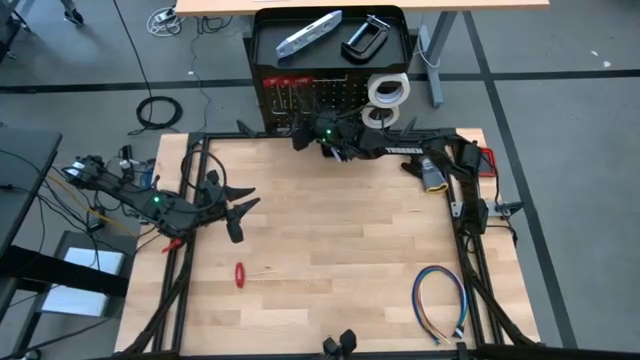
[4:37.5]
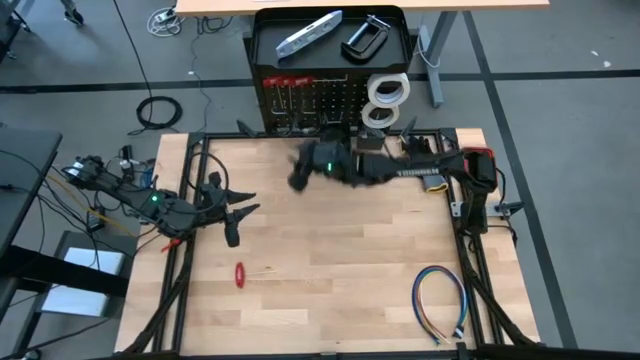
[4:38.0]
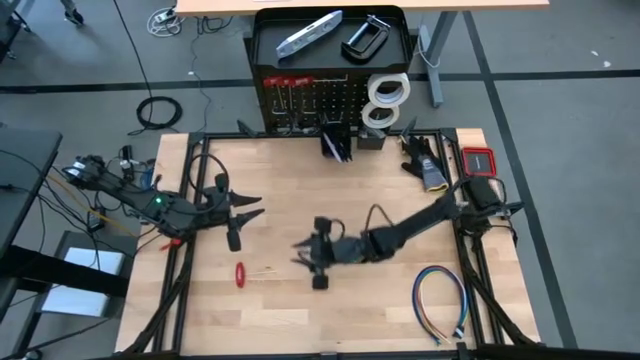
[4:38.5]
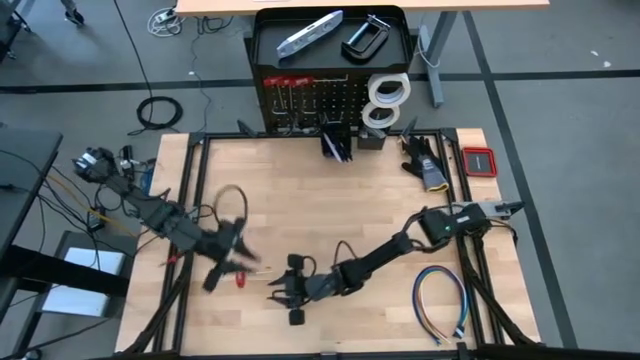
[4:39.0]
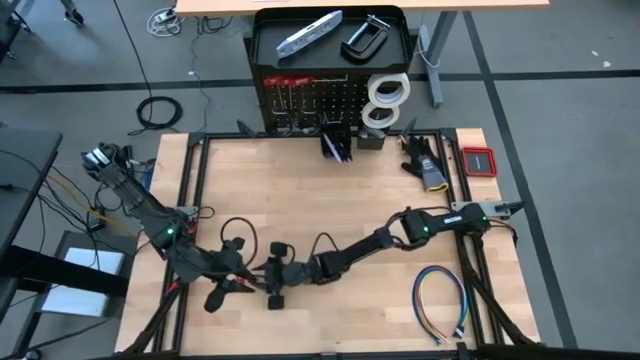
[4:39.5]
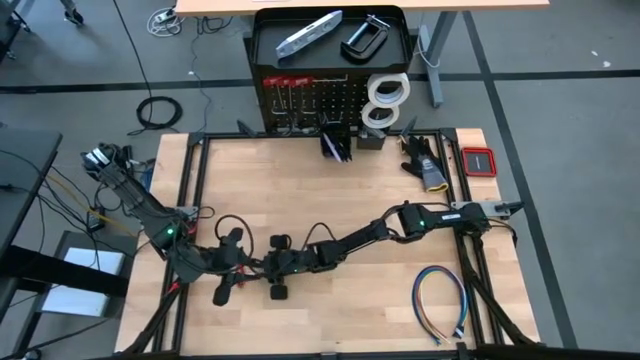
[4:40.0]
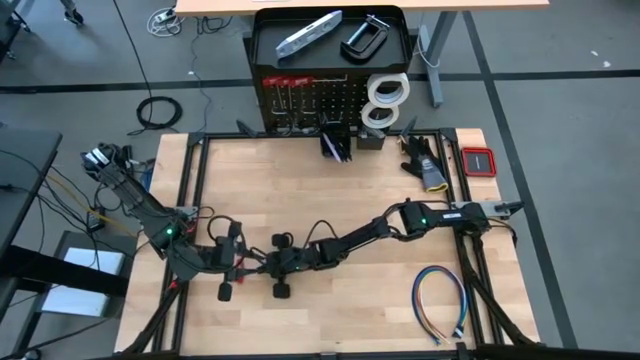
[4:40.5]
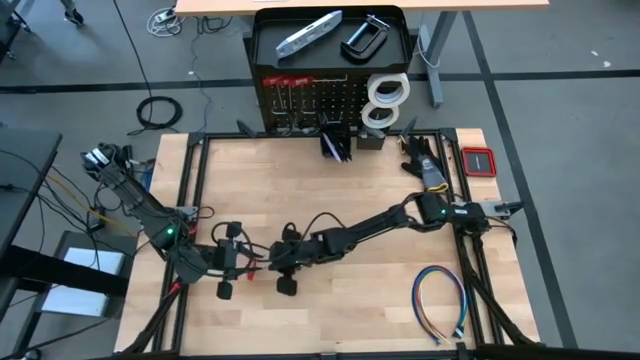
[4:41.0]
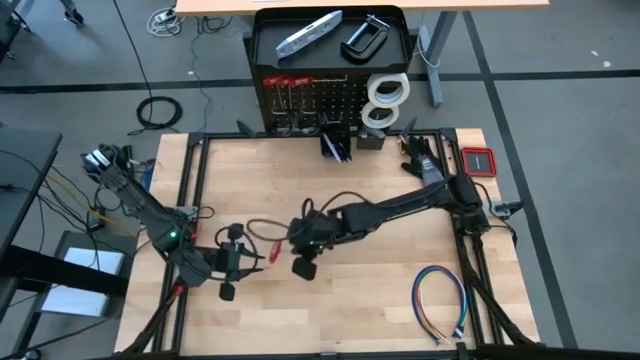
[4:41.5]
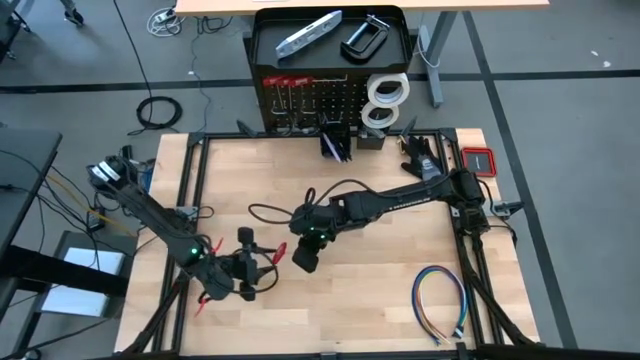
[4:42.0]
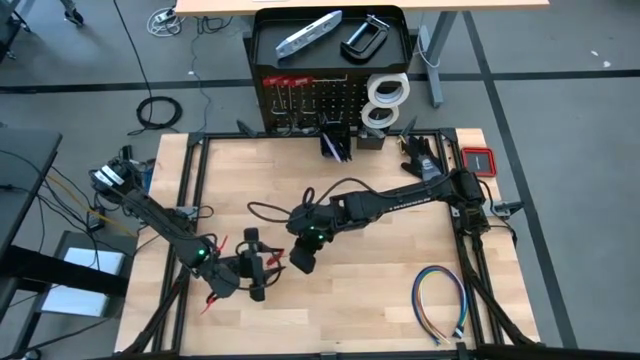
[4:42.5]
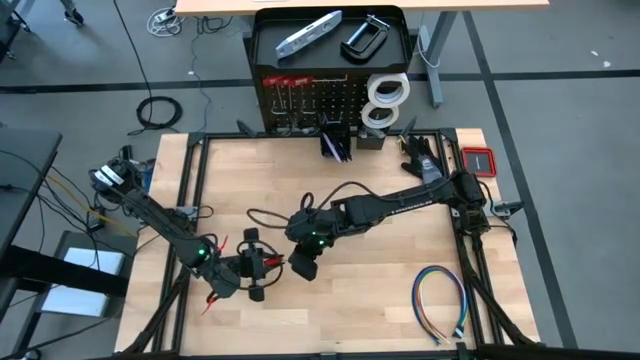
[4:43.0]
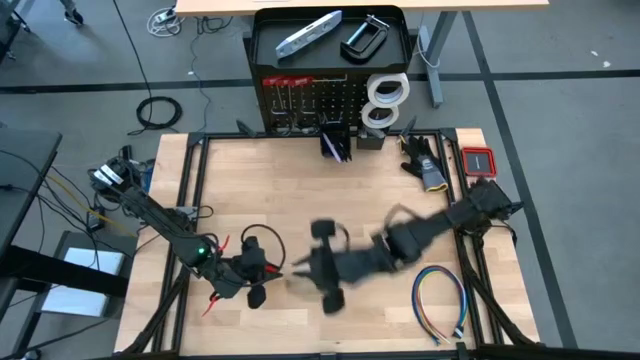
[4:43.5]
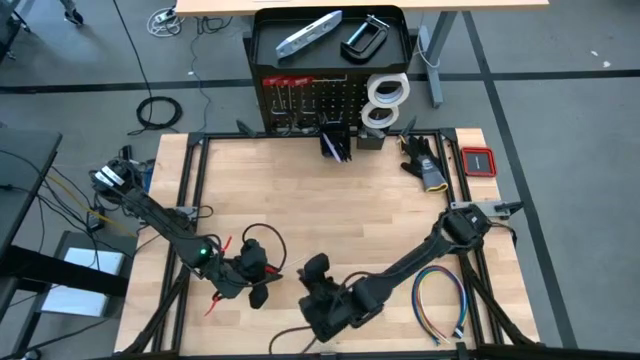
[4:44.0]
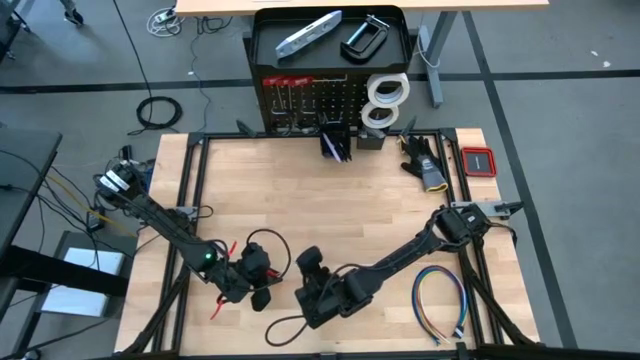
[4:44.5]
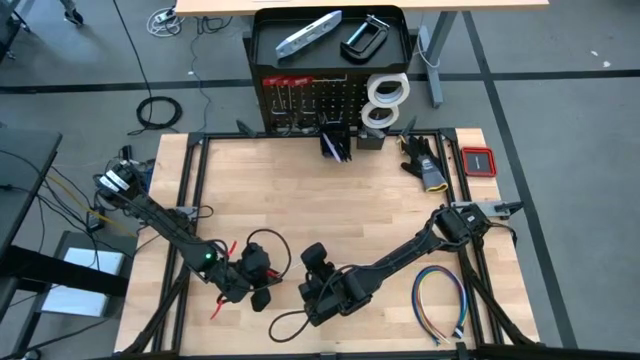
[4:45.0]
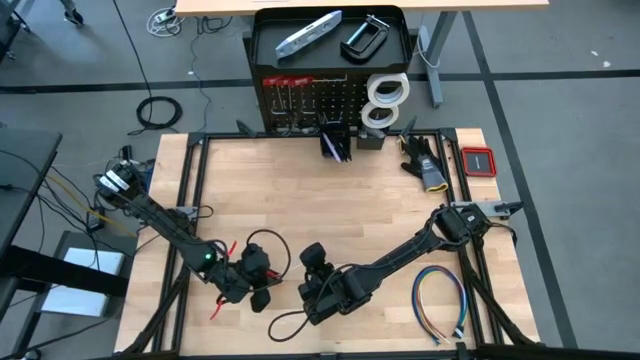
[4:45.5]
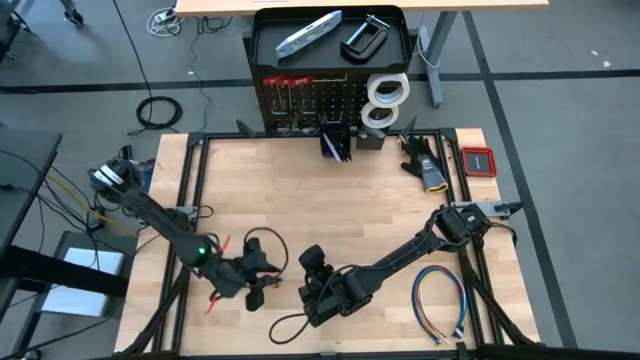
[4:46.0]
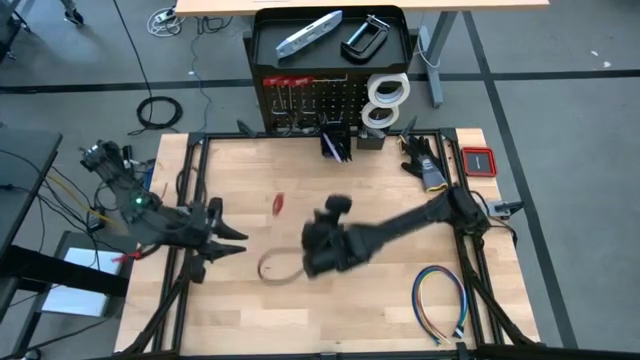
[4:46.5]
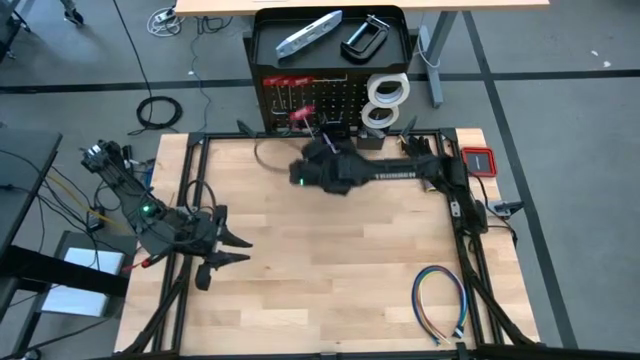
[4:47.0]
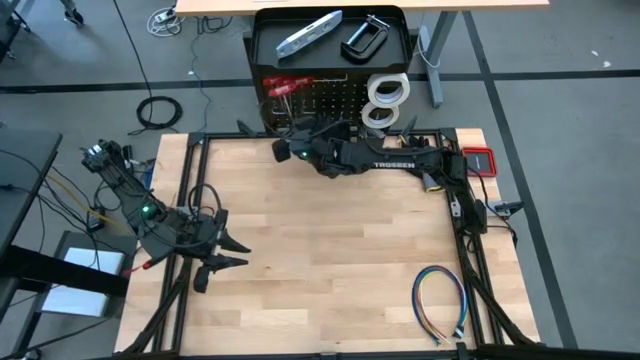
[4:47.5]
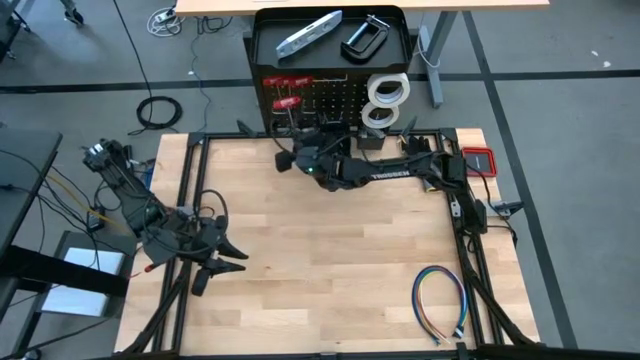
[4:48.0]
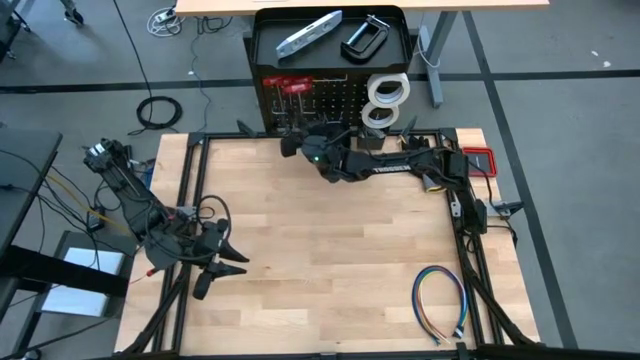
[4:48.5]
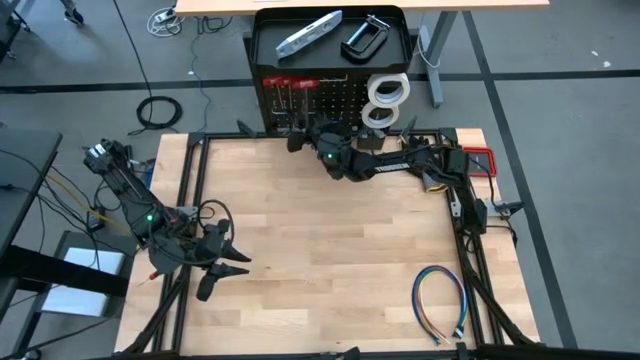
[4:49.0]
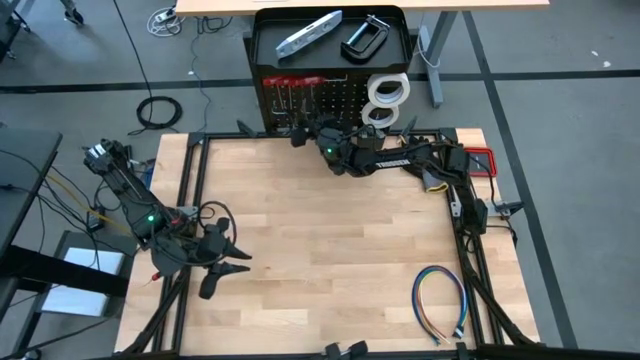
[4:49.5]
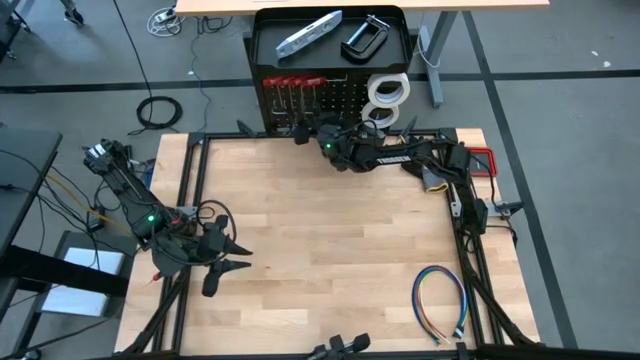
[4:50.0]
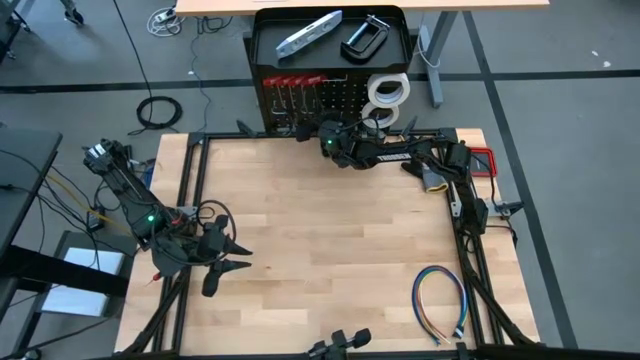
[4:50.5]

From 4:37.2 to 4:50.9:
Task: Hang tools onto peg board
Hang the red allen wrench on the peg board

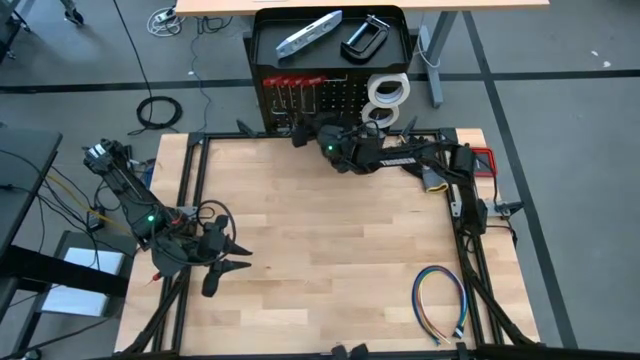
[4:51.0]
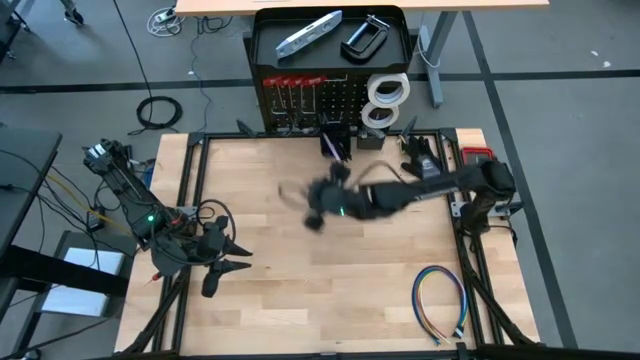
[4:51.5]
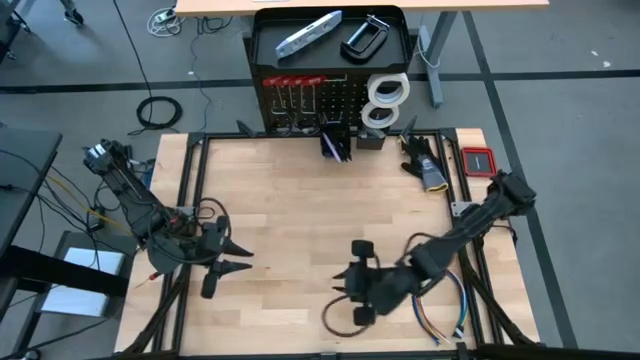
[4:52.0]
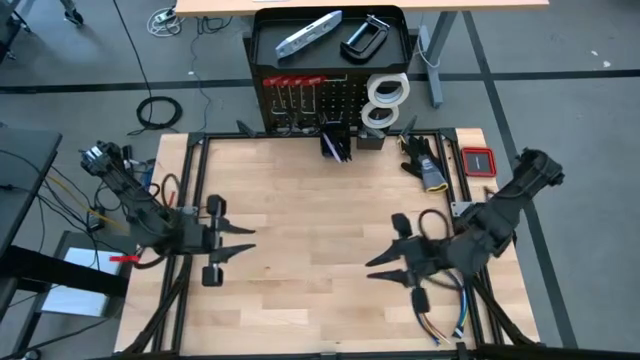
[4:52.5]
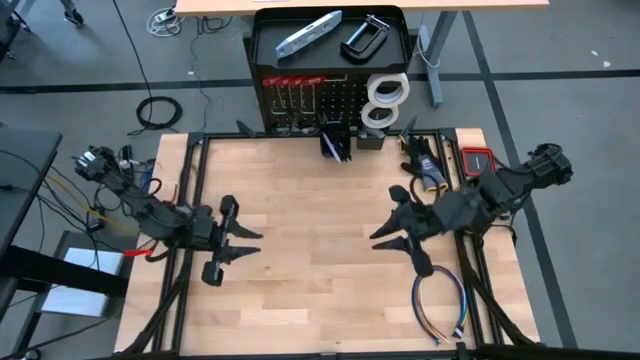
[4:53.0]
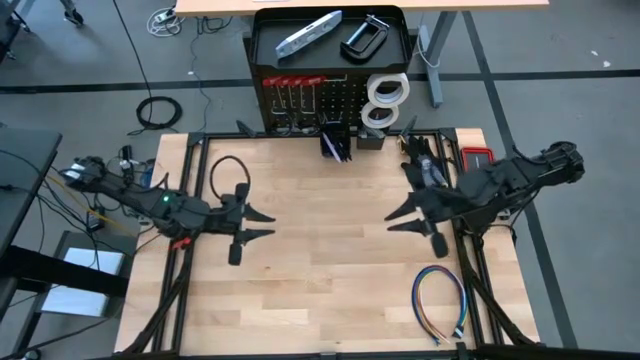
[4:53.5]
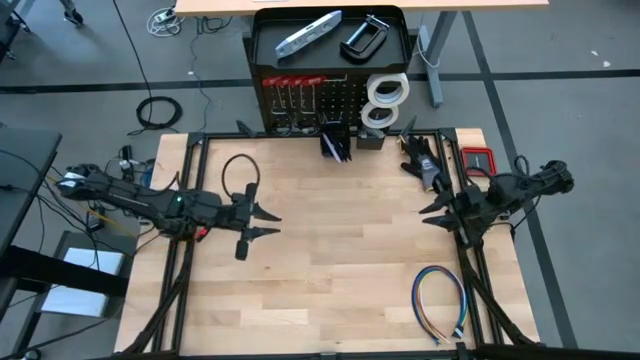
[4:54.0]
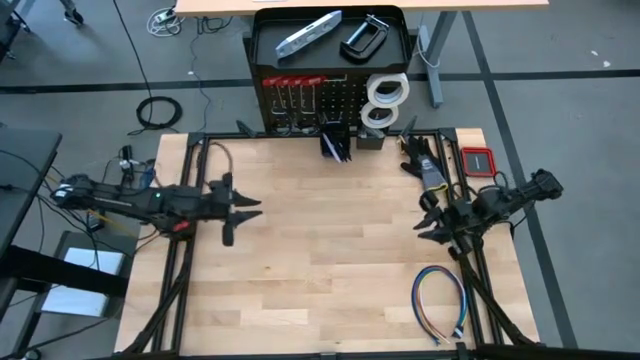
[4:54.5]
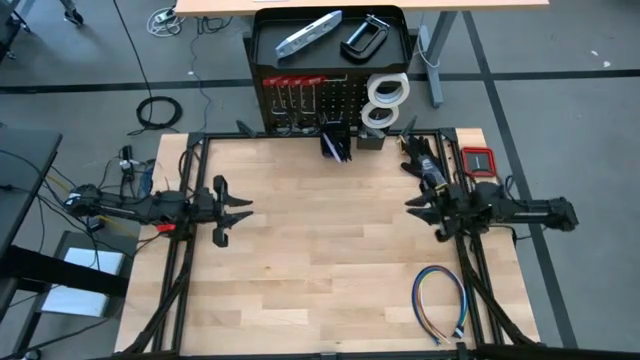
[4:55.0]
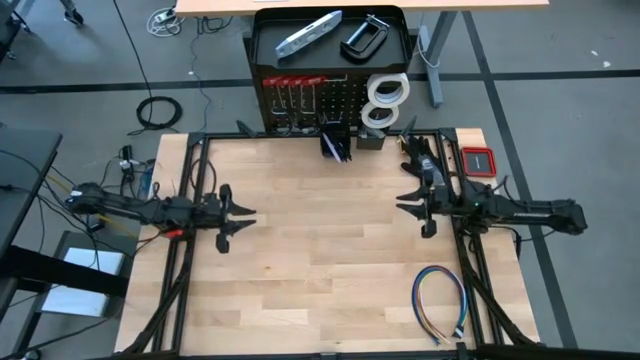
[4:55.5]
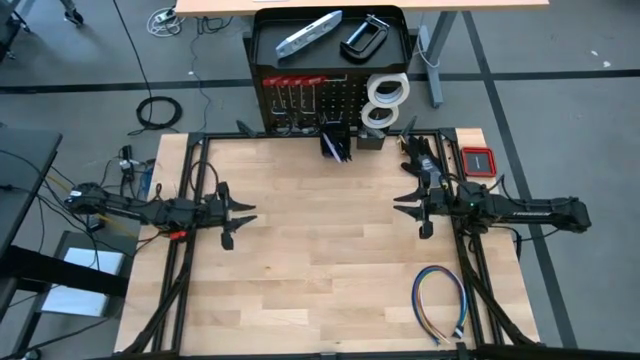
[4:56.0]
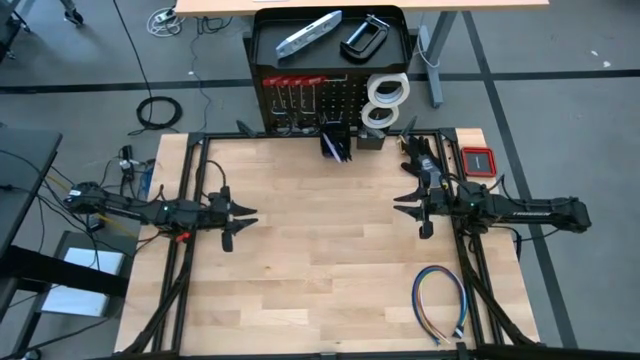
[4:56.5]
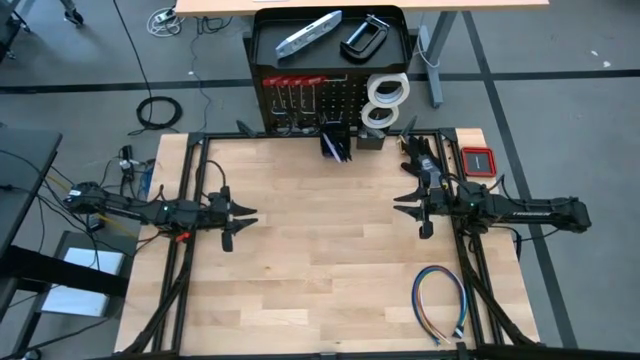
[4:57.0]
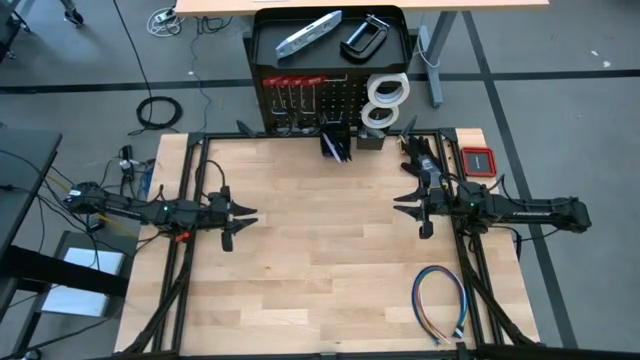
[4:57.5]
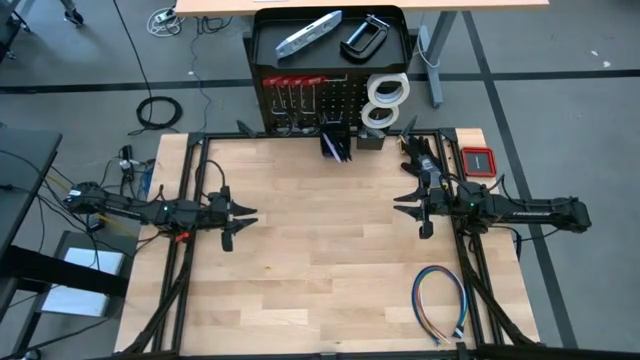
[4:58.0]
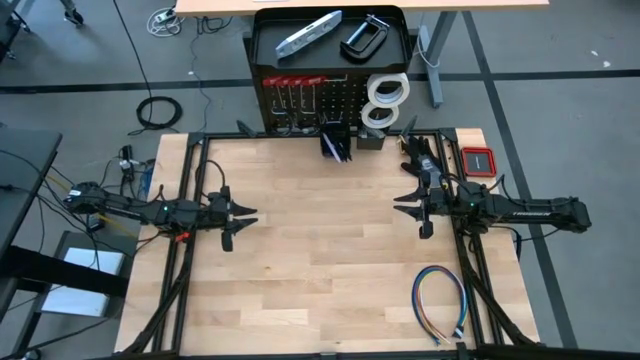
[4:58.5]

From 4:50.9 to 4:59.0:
Return to Home Position
